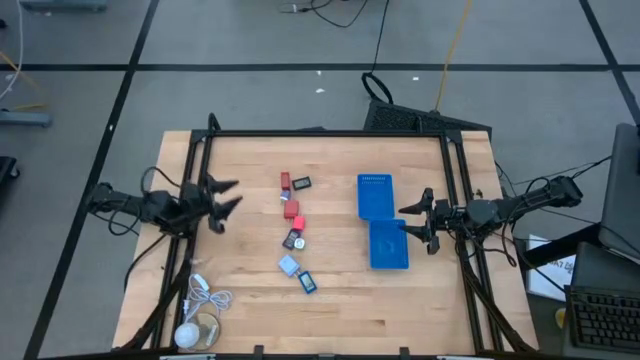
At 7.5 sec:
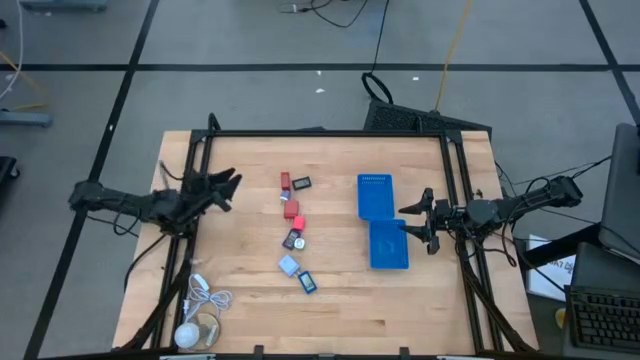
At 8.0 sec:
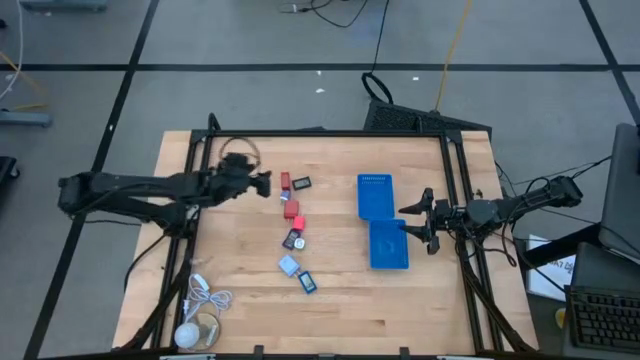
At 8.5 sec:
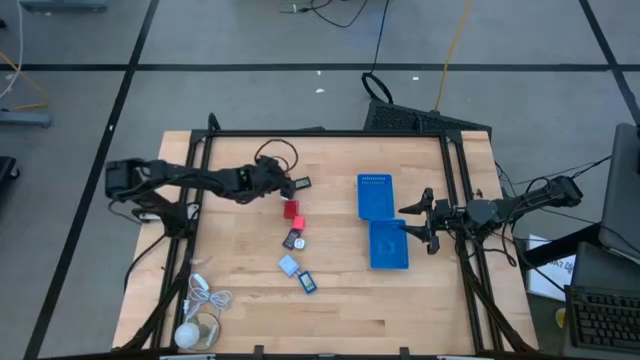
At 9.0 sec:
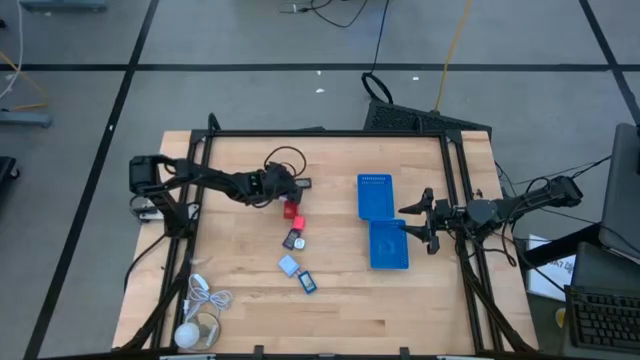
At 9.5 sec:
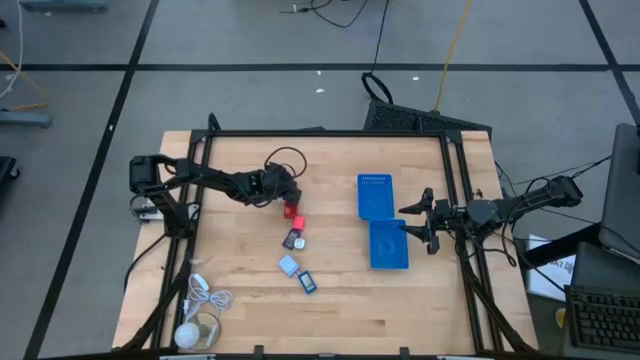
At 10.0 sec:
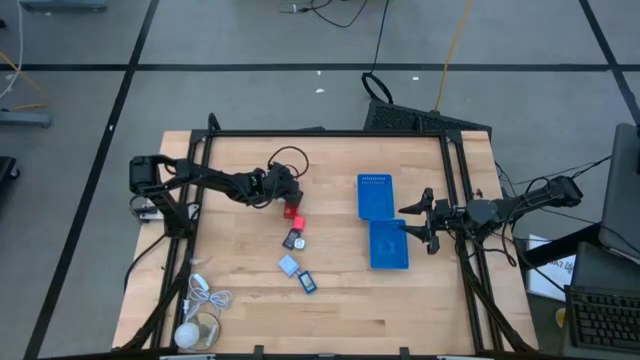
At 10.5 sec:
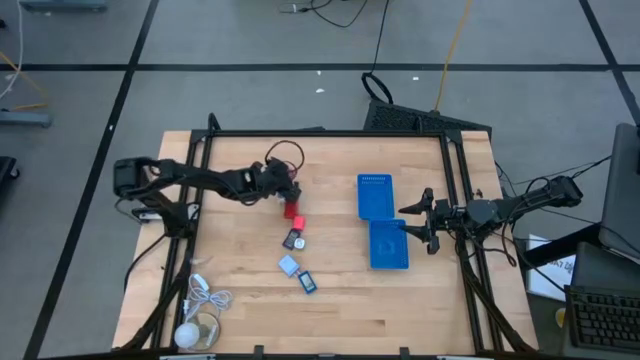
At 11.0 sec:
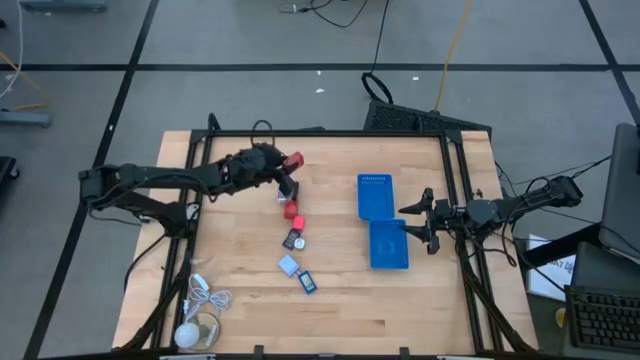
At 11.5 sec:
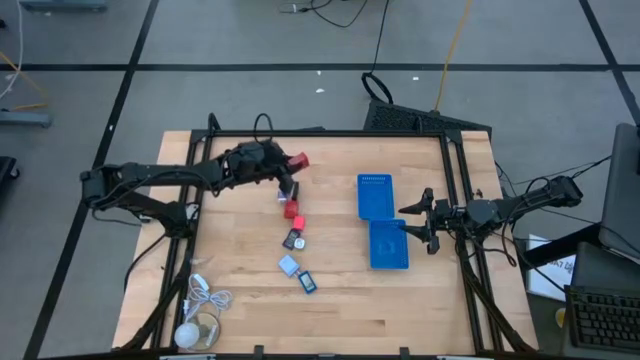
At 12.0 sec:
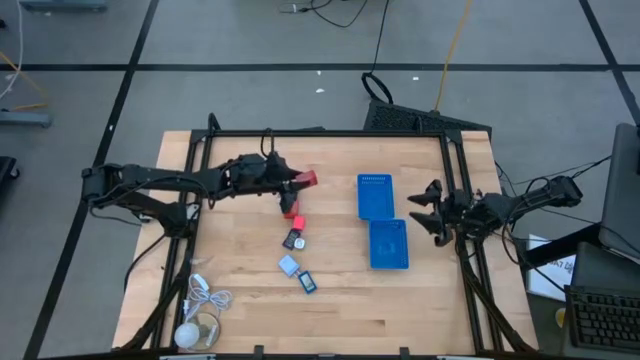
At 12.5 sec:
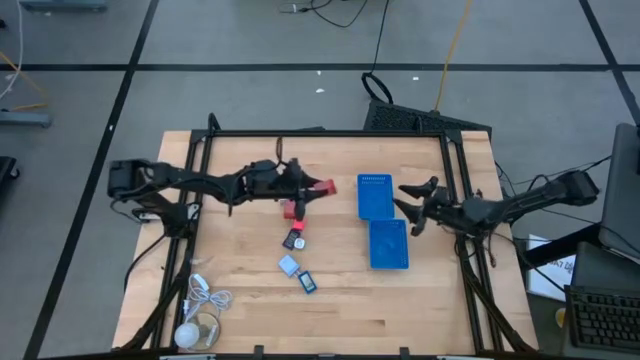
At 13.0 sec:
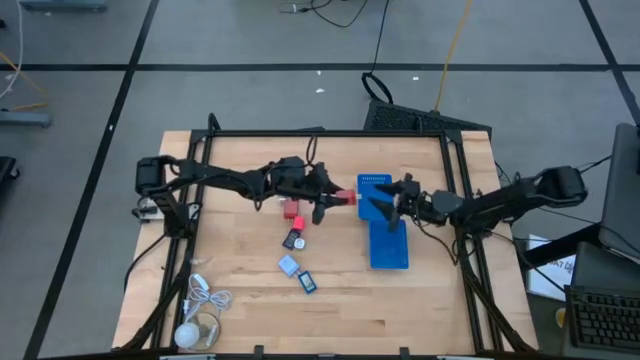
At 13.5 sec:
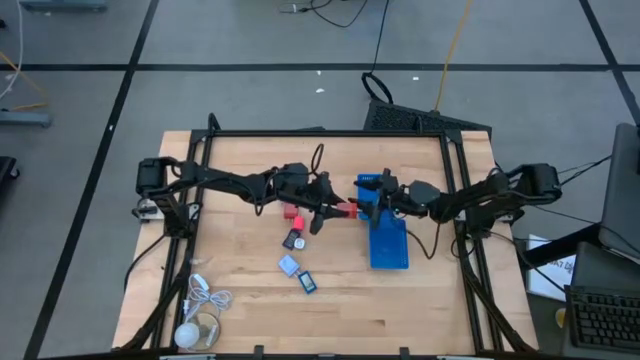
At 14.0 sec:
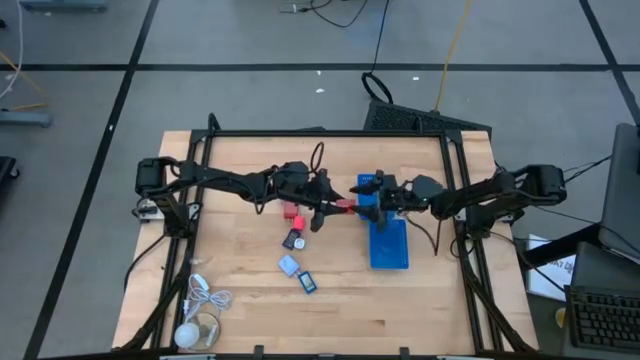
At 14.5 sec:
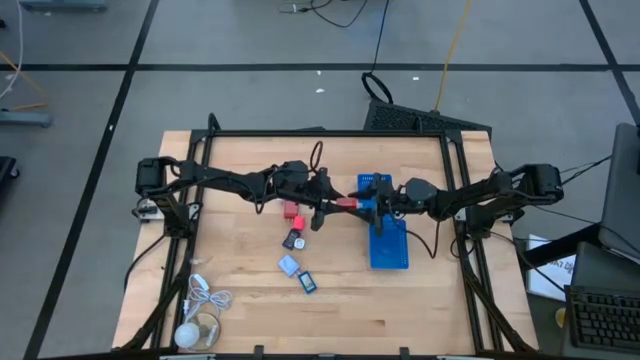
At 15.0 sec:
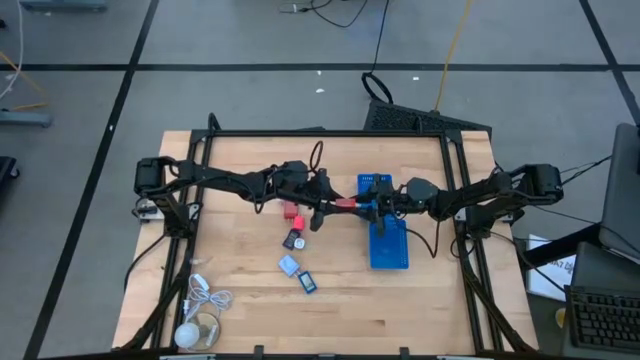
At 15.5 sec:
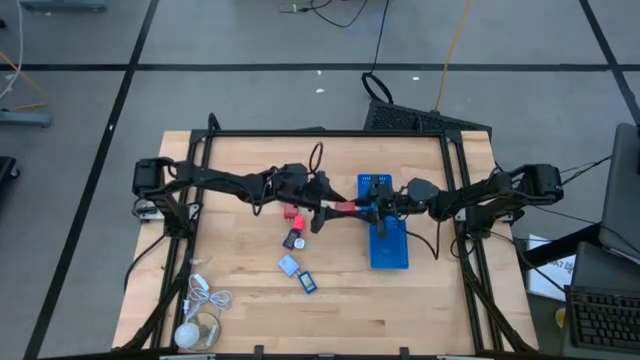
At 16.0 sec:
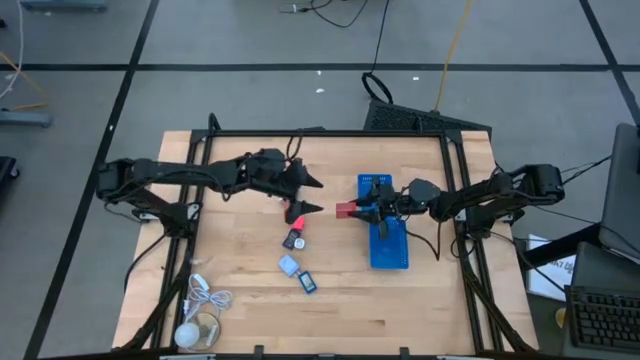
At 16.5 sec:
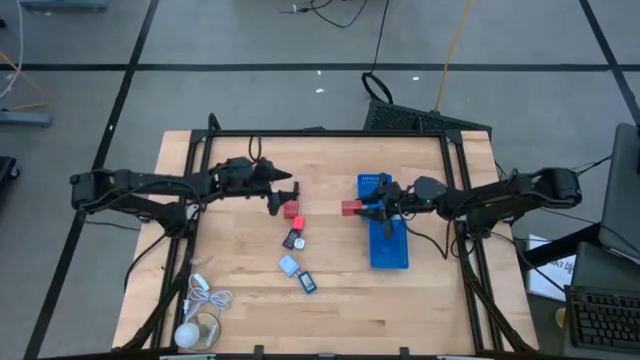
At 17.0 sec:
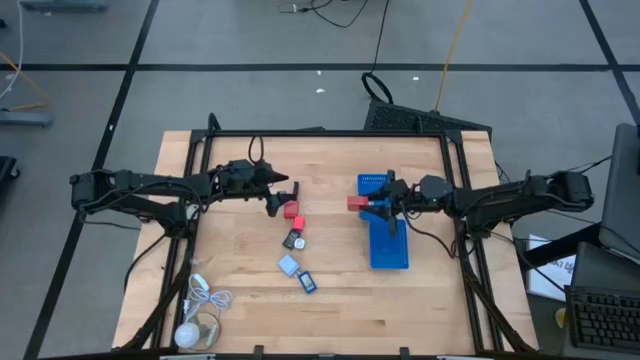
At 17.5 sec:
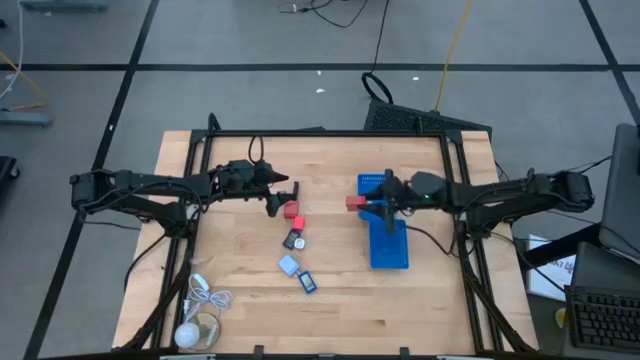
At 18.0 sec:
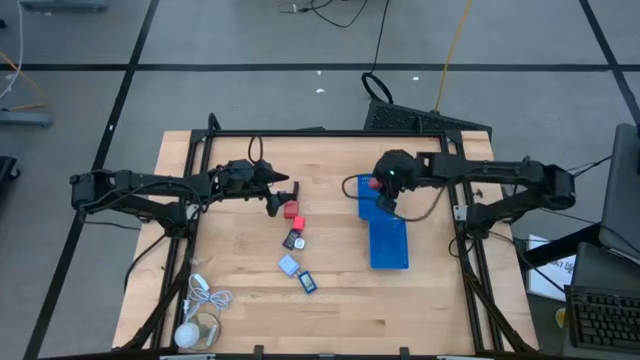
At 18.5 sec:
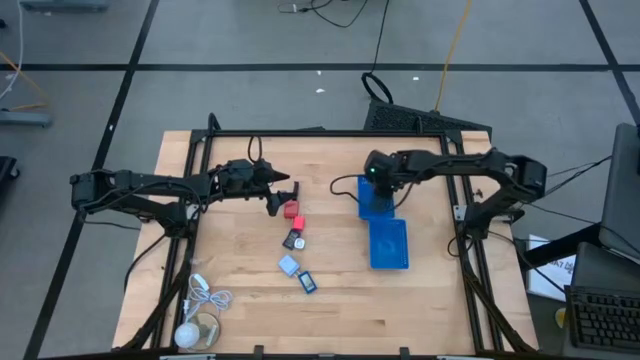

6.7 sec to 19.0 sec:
Task: Pick & Place Office items
Put the top red charger adapter into the top blue bin

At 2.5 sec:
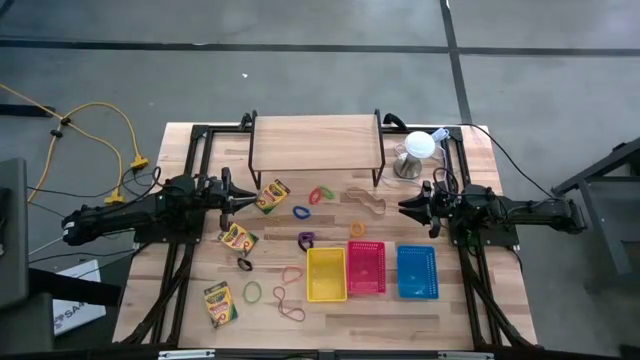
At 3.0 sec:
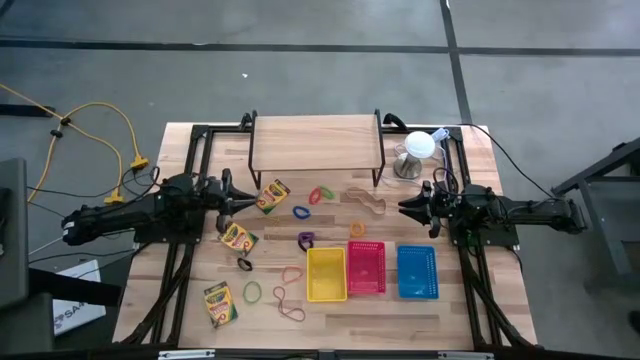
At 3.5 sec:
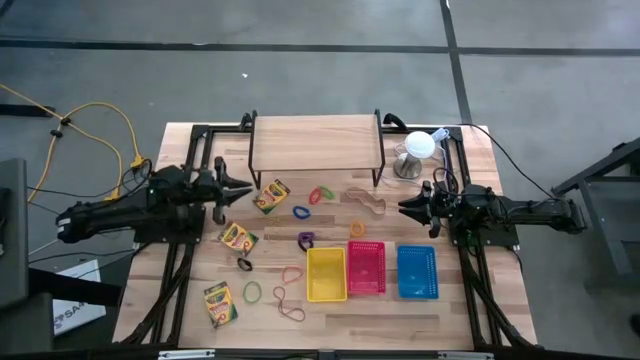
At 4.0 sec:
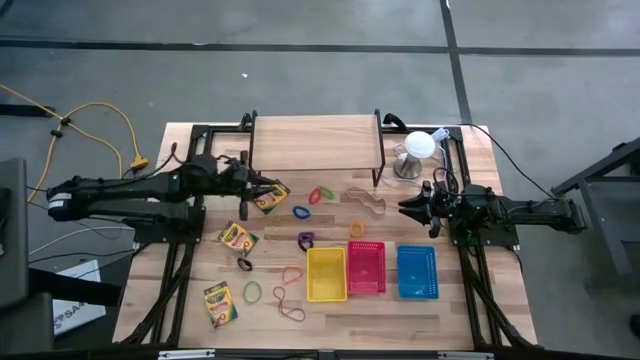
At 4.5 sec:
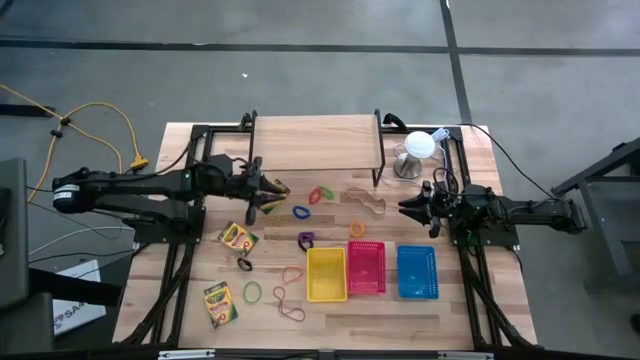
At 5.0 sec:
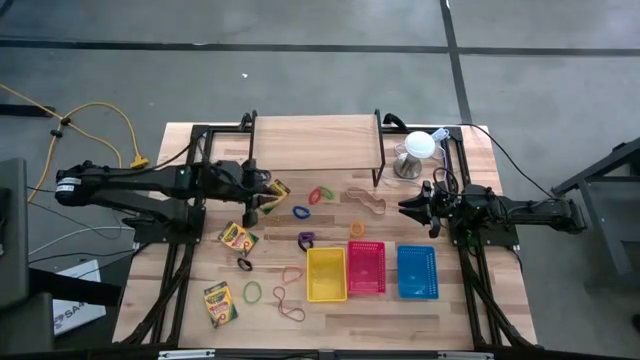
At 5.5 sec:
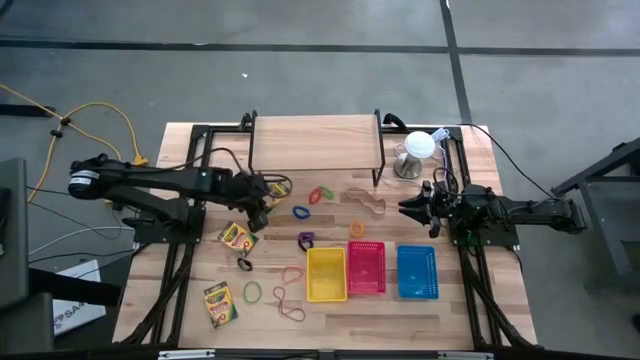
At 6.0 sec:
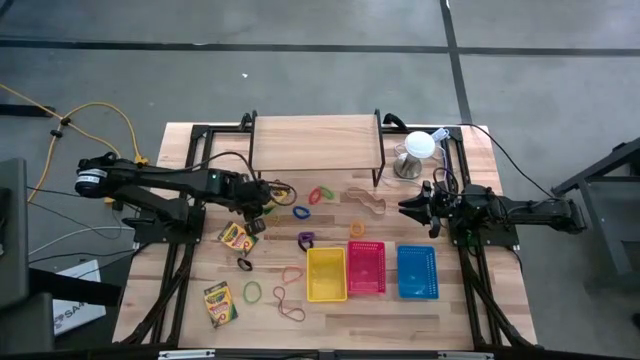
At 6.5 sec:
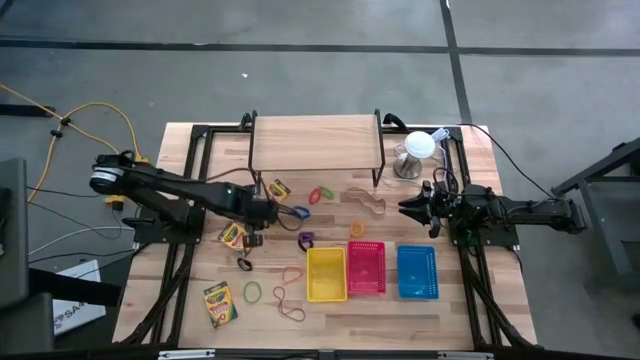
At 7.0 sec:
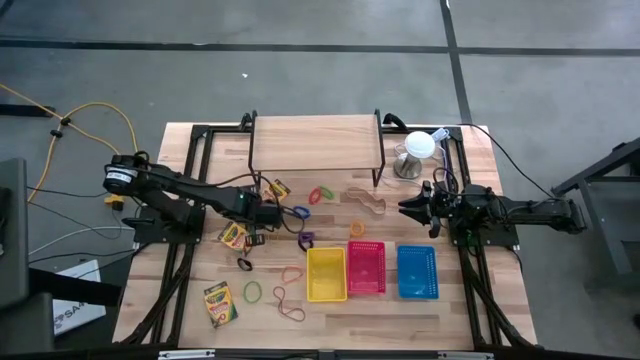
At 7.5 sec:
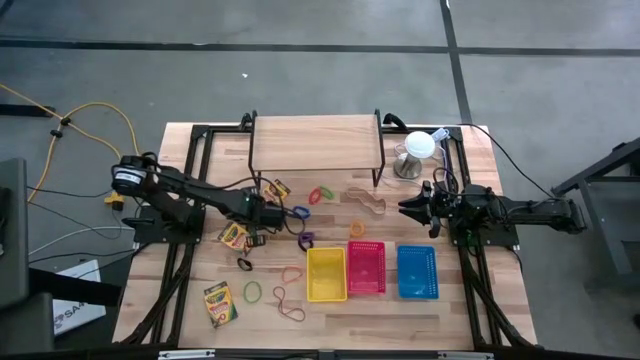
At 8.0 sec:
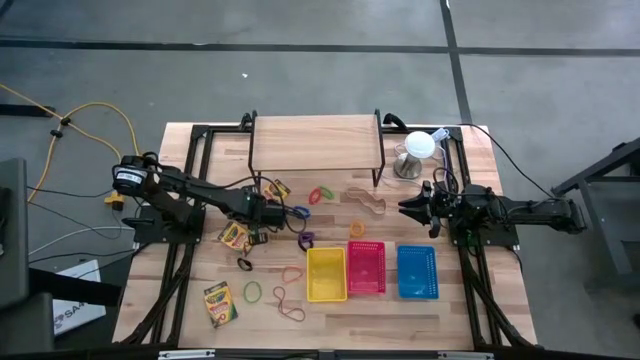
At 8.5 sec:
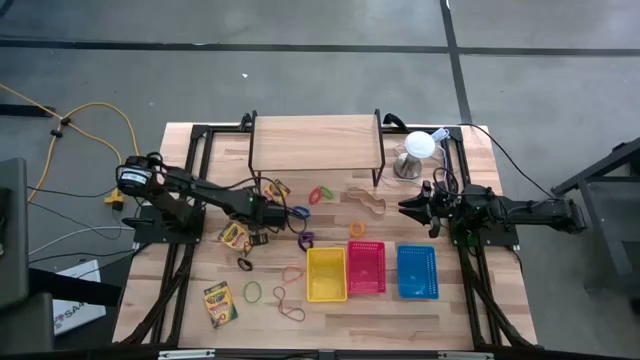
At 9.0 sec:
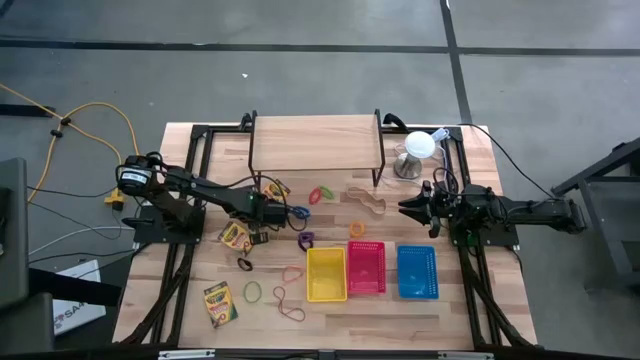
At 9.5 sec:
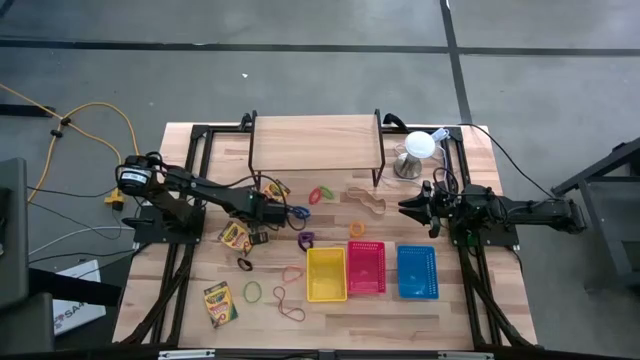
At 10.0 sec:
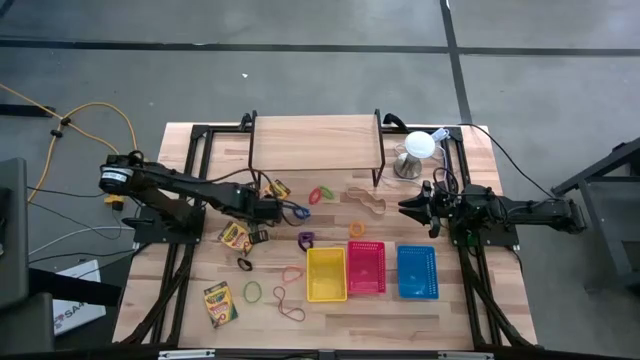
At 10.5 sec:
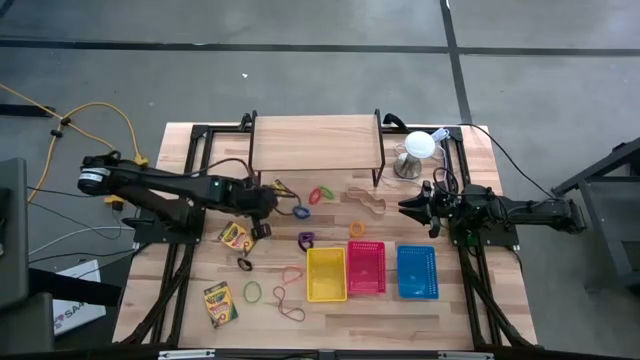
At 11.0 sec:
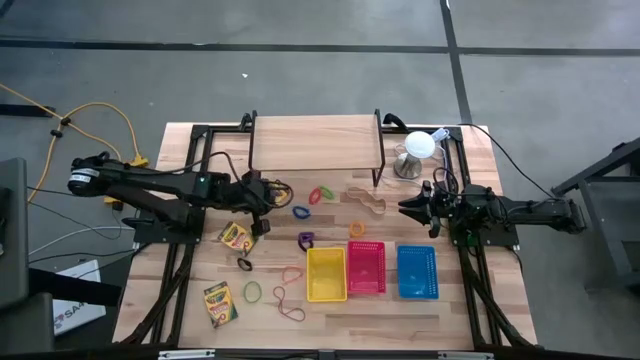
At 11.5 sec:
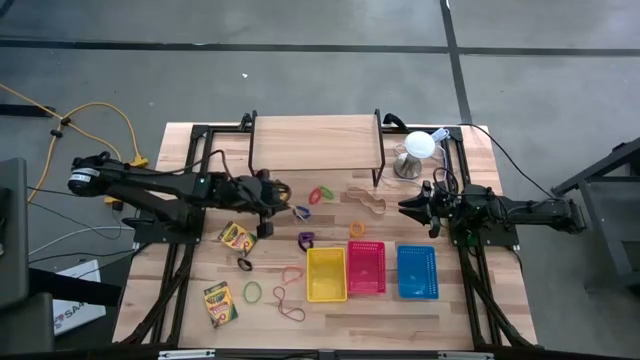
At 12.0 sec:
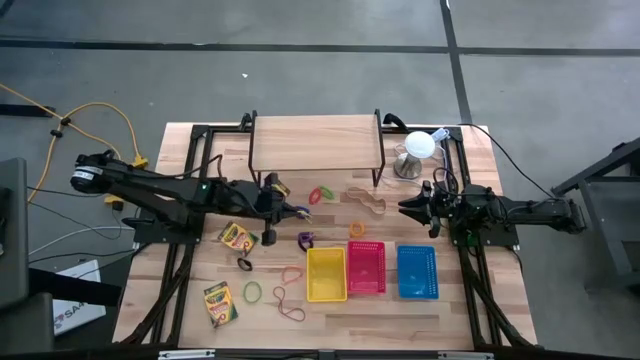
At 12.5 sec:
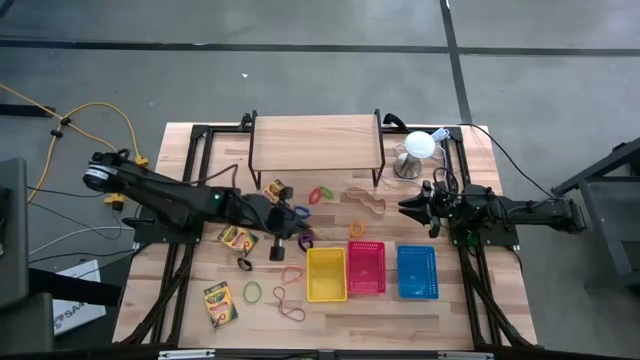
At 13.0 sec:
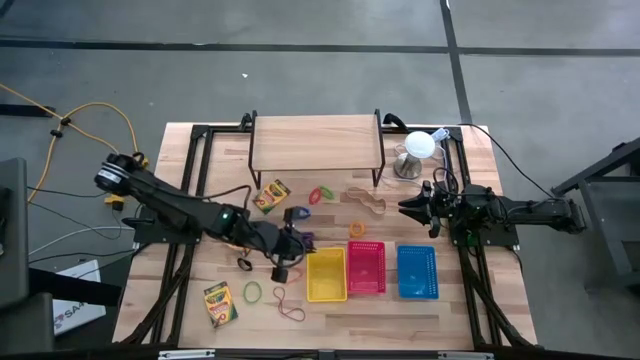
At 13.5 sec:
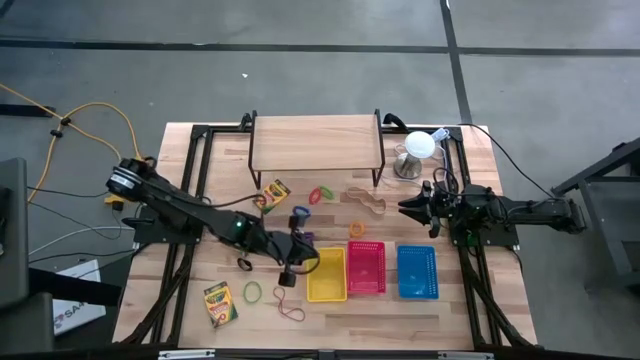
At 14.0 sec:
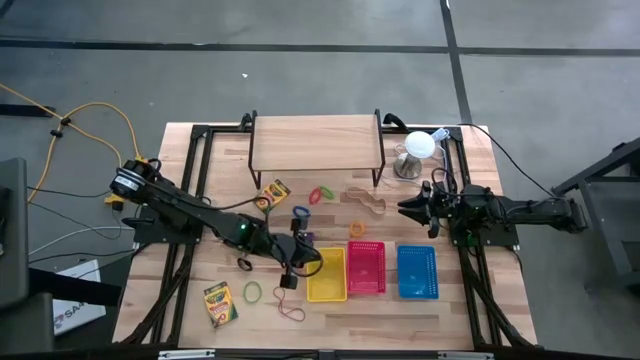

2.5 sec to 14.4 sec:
Task: Pick & Place Office Desk Supplies
Put the yellow rubber band into the yellow bin
